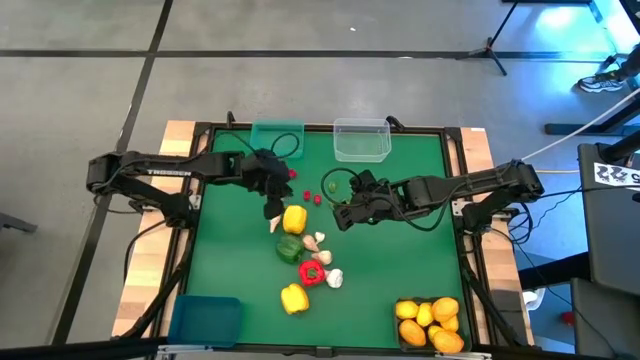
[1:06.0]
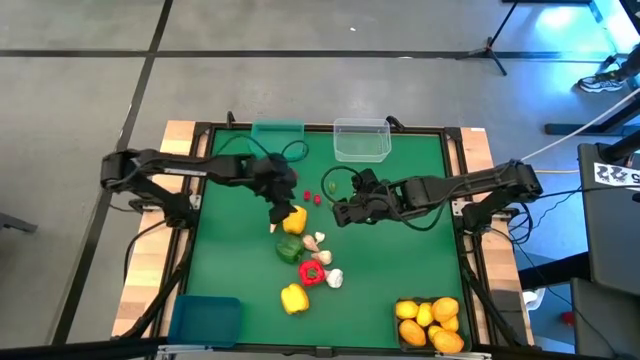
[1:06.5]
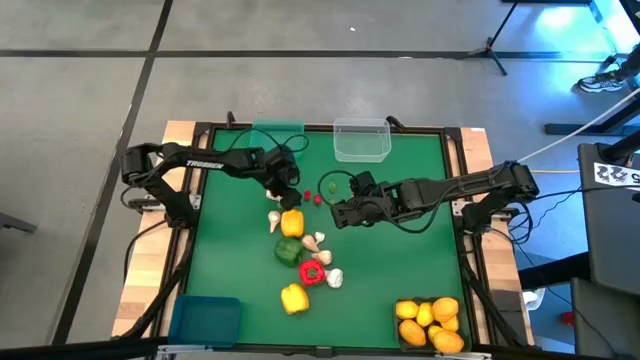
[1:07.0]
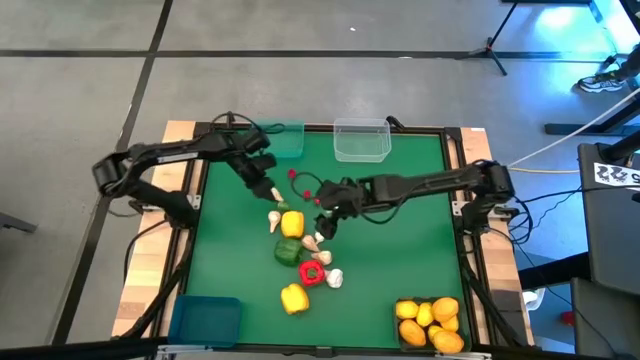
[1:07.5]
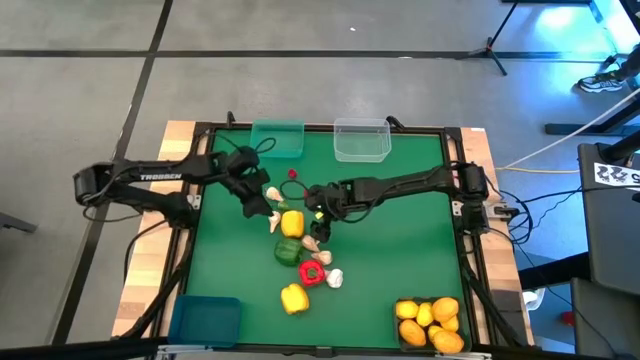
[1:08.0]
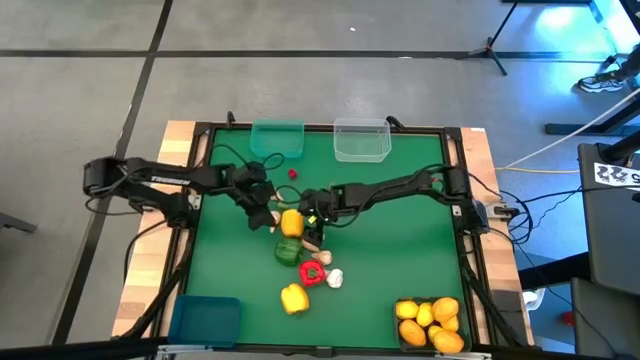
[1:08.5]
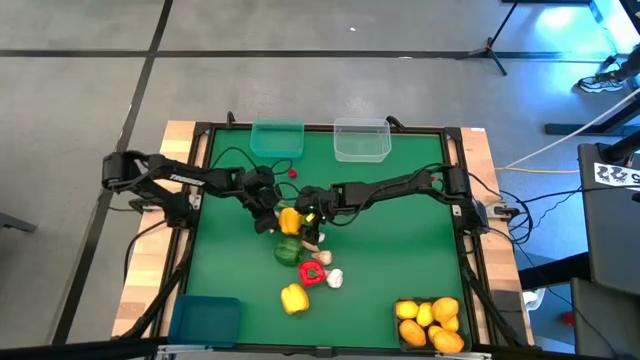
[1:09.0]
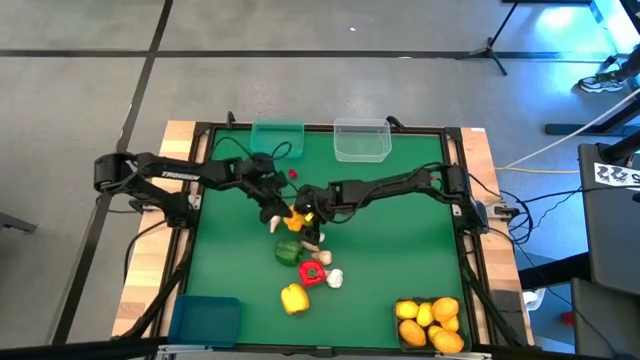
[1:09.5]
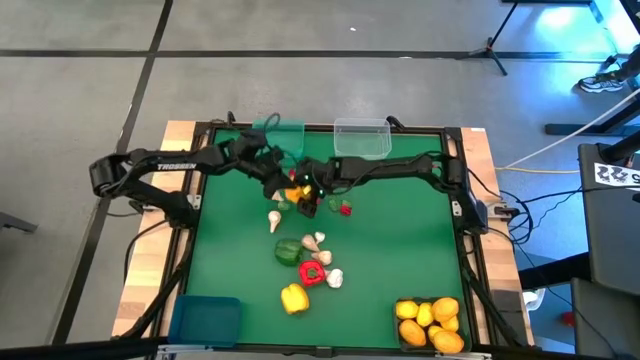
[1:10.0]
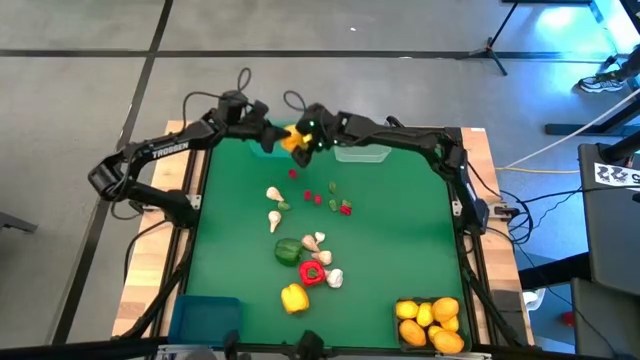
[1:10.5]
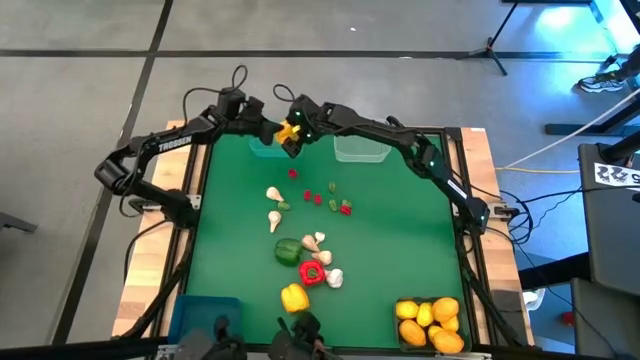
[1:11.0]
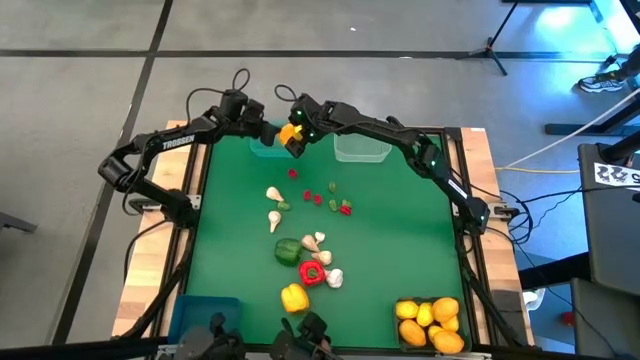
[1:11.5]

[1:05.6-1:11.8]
Task: Sort produce into baskets
Put the yellow bell pepper into the blue bin

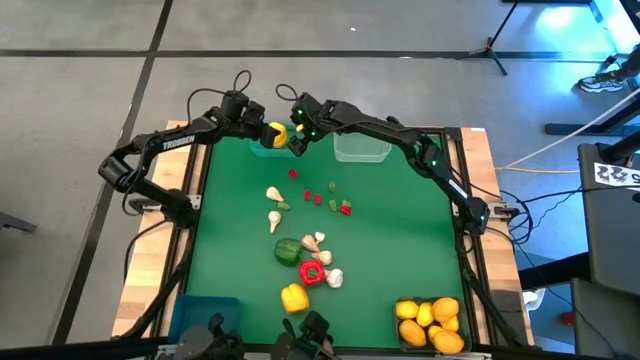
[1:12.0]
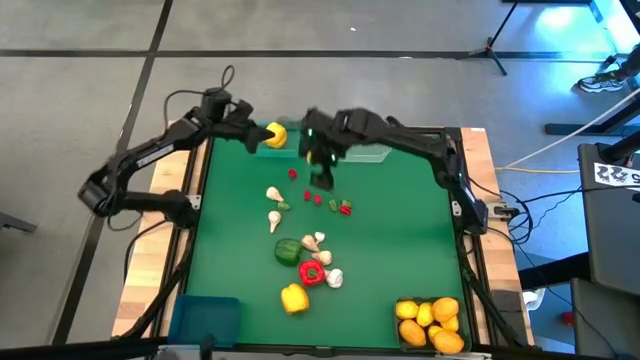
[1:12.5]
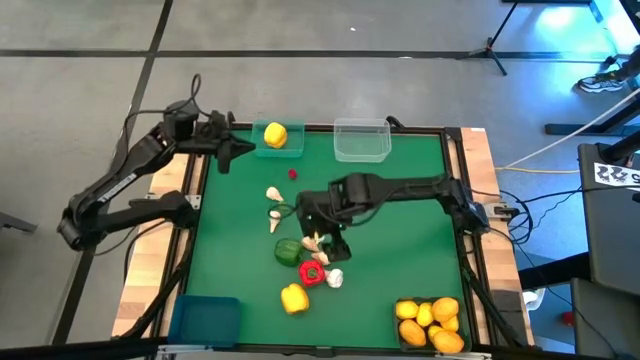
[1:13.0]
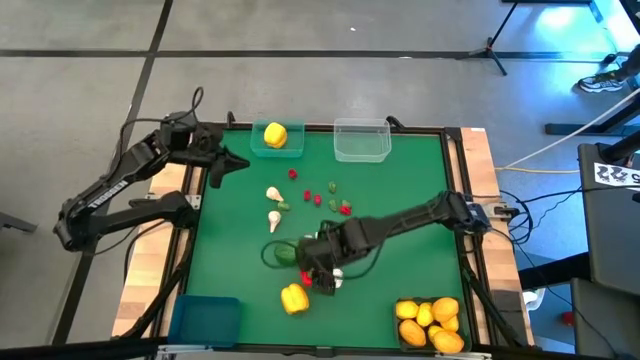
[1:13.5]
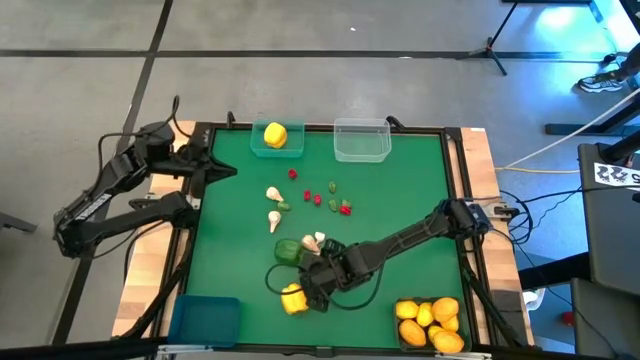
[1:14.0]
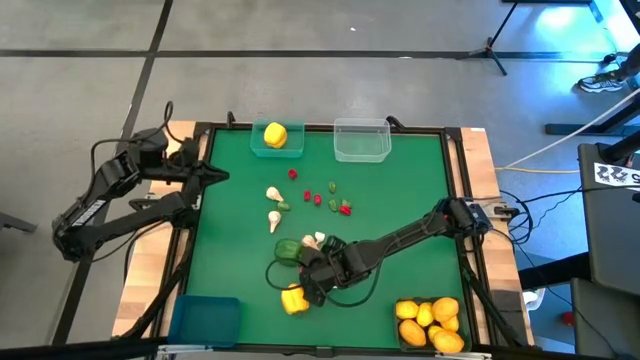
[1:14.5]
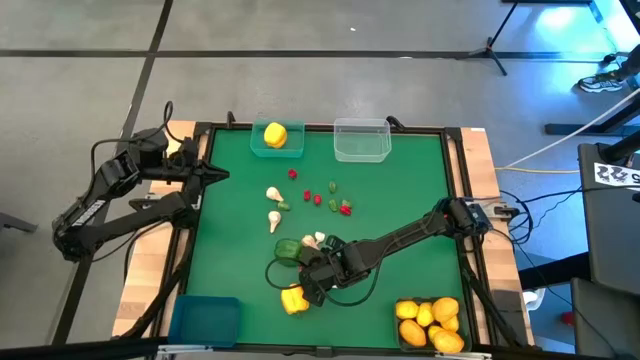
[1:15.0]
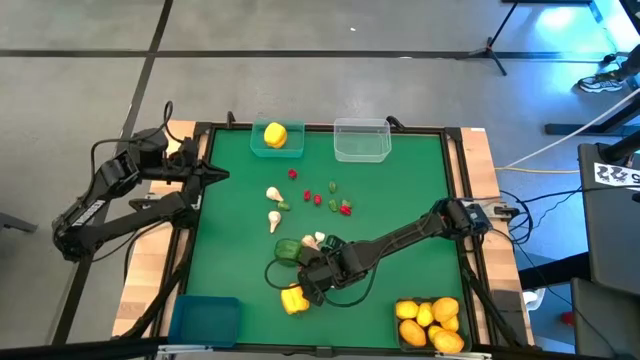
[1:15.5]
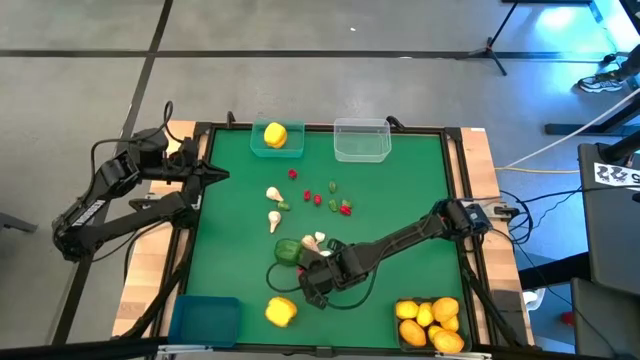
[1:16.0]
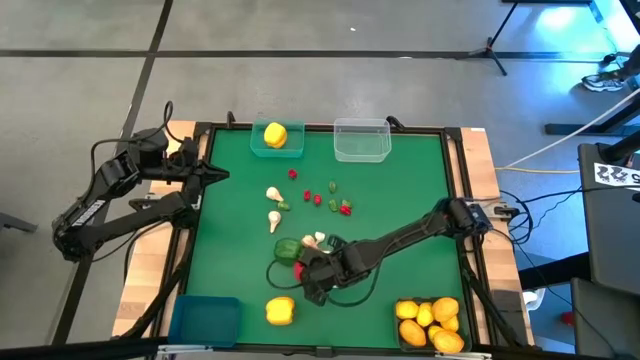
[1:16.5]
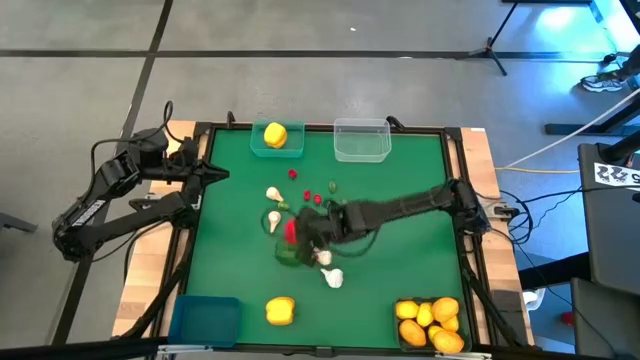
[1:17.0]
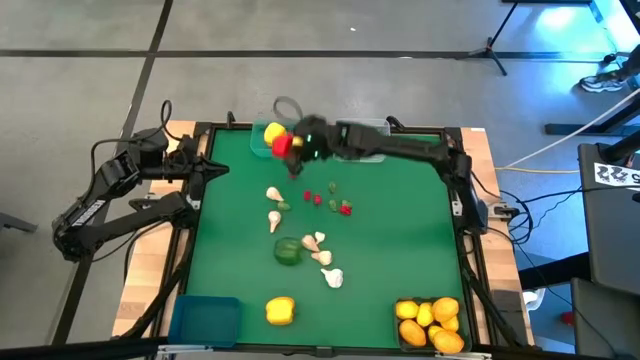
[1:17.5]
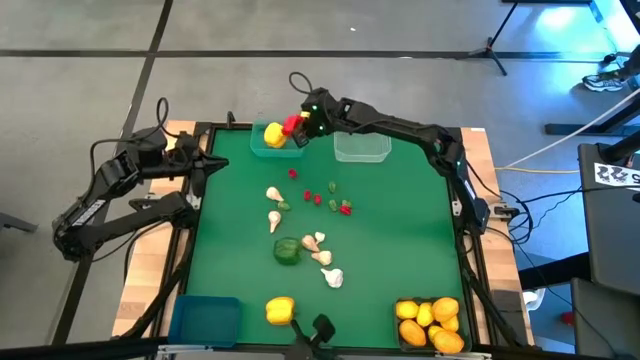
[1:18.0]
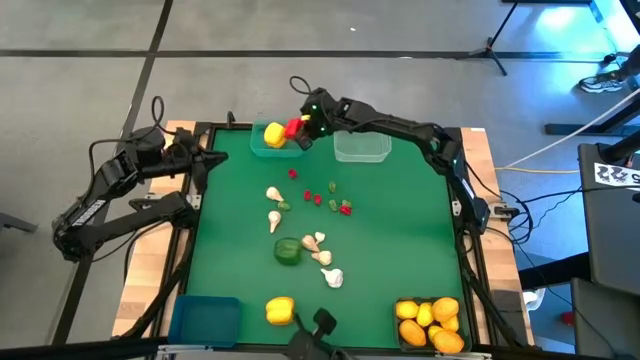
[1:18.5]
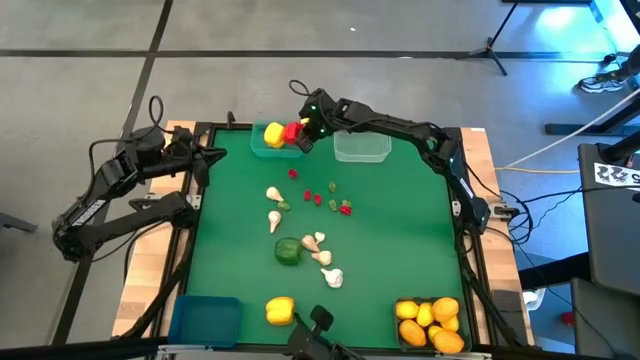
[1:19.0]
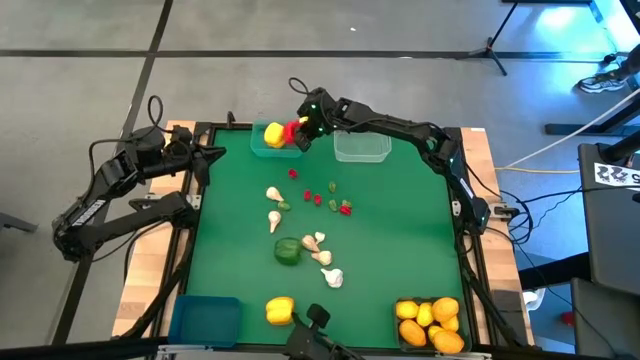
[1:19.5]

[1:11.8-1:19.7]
Put the red bell pepper into the green bin

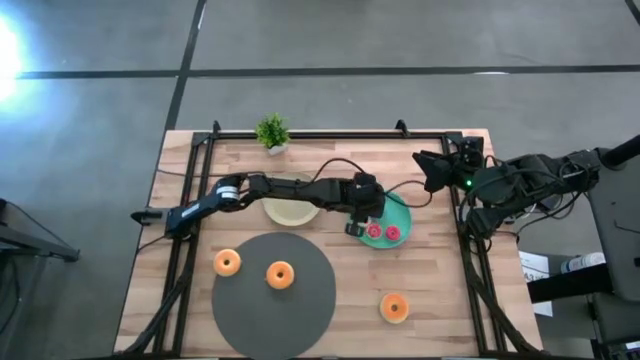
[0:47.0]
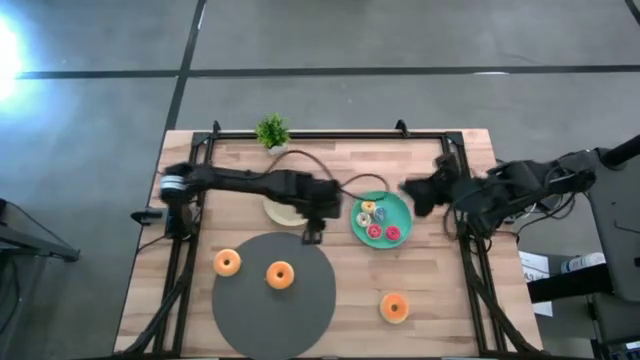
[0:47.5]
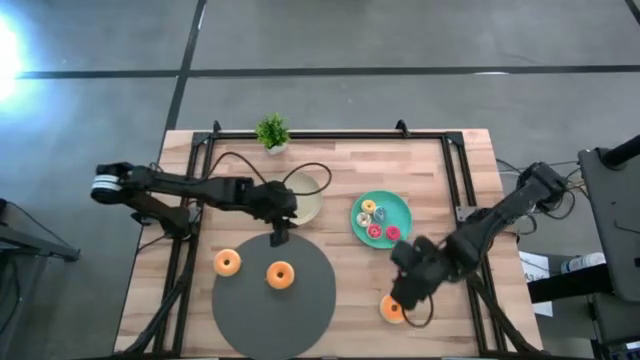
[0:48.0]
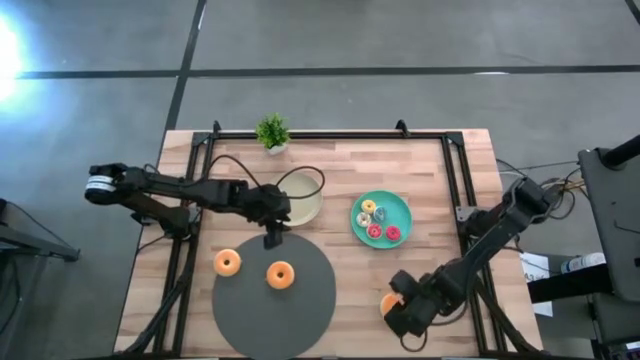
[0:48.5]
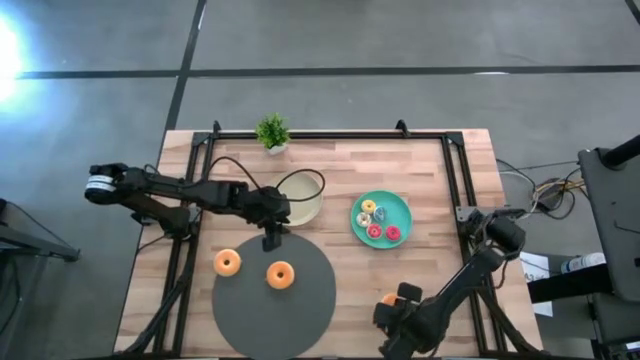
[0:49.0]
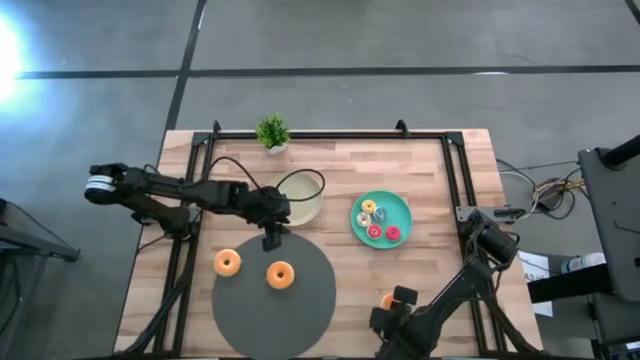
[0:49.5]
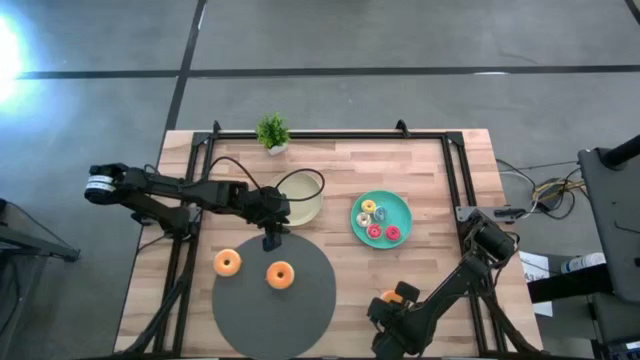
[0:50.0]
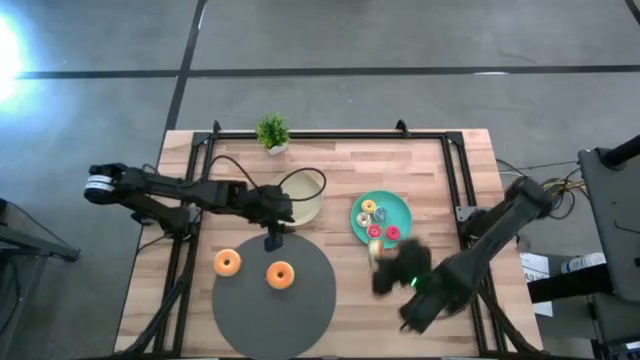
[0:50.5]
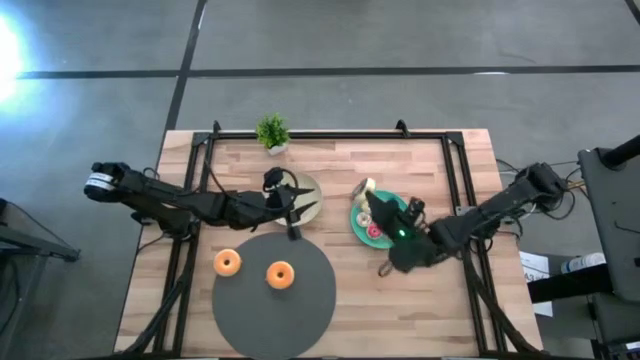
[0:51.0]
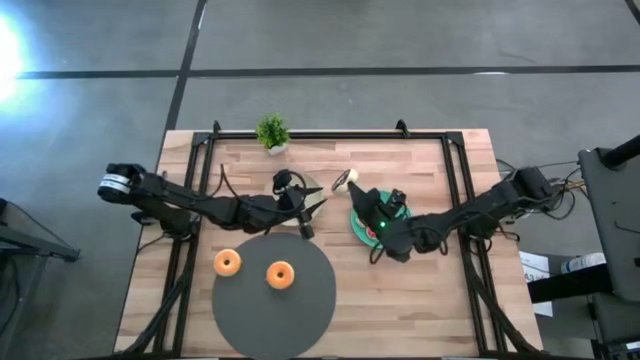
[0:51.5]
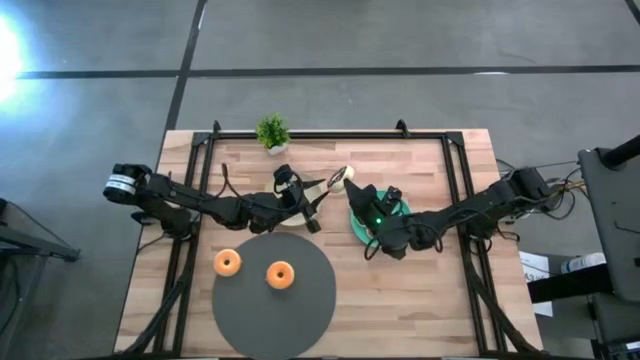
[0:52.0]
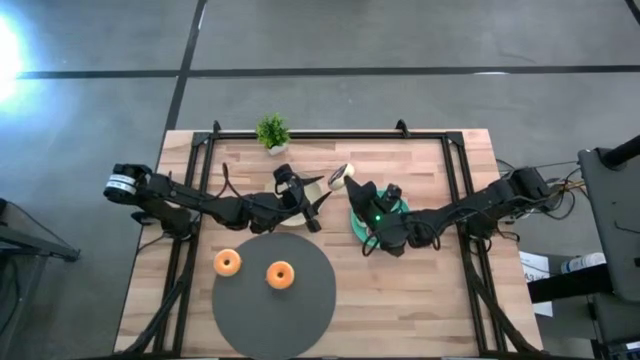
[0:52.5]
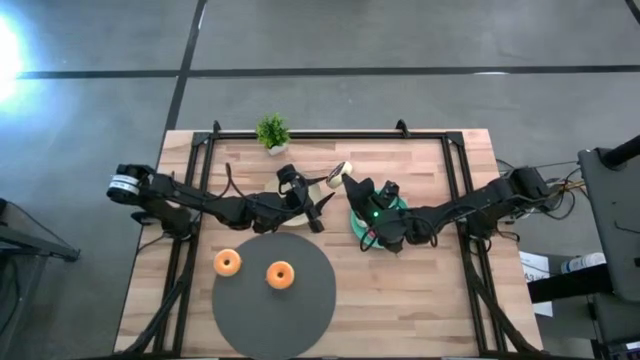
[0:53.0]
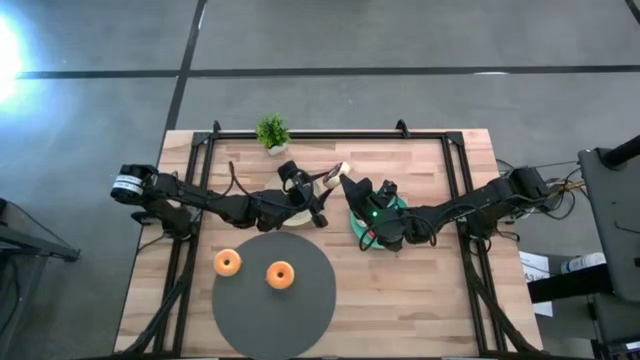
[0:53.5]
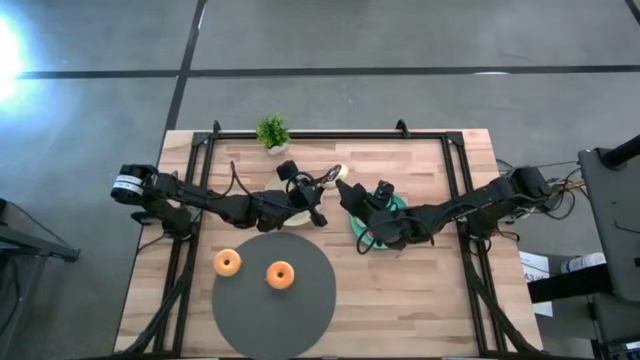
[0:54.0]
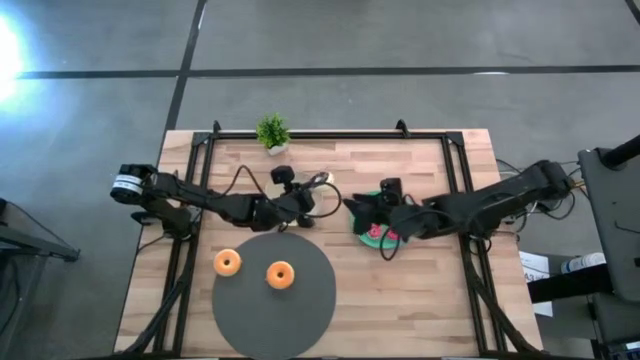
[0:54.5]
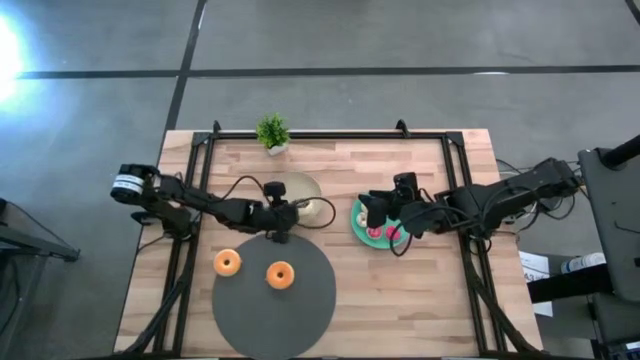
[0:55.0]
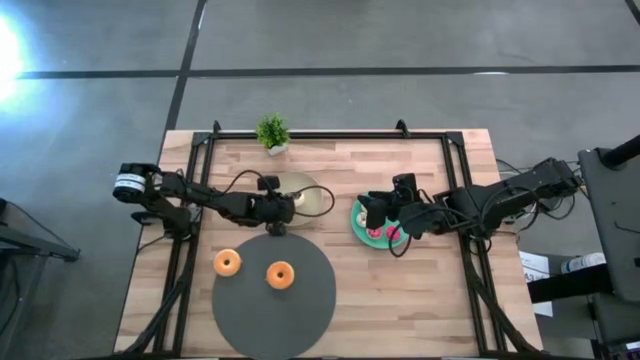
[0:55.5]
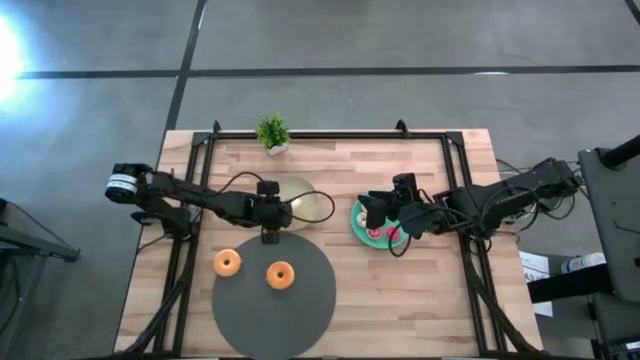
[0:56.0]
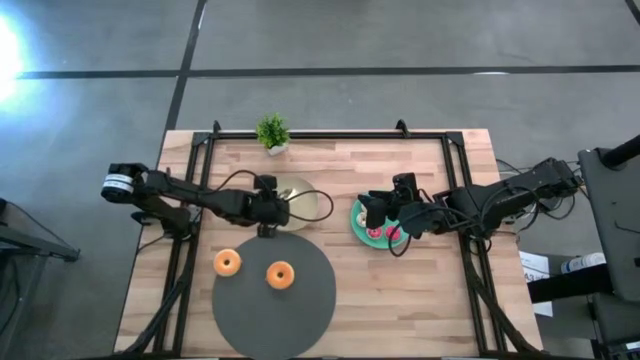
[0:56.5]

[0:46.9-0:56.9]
Task: Pick & Place donuts
Put the large black donut on the brown plate
